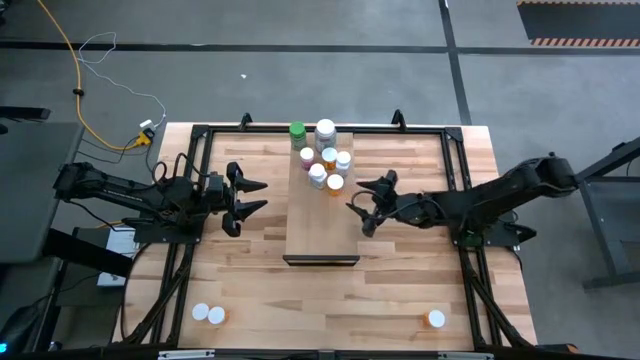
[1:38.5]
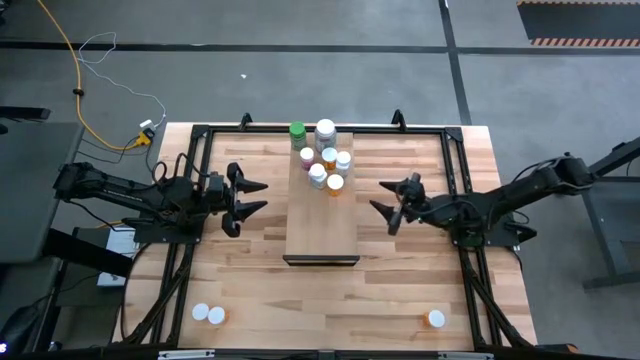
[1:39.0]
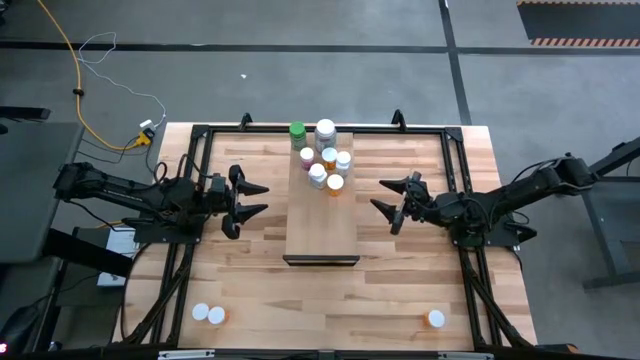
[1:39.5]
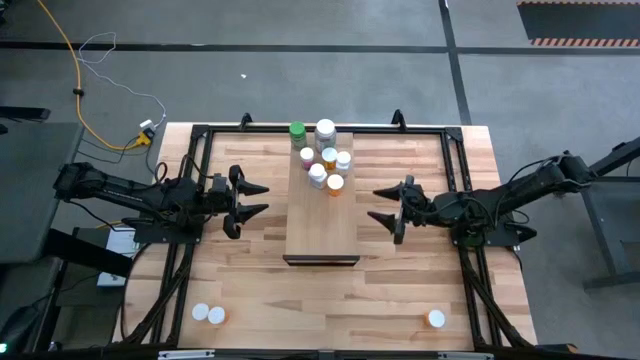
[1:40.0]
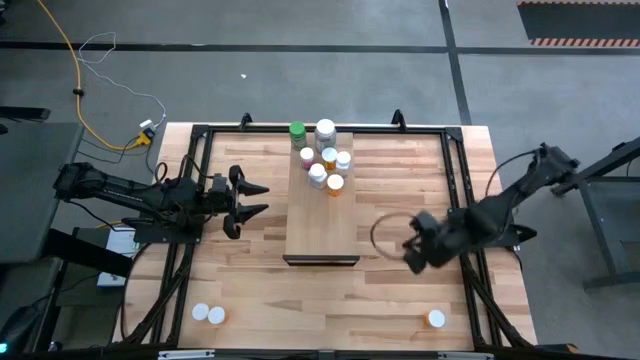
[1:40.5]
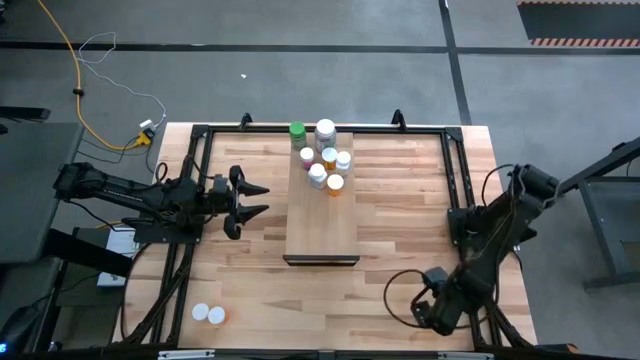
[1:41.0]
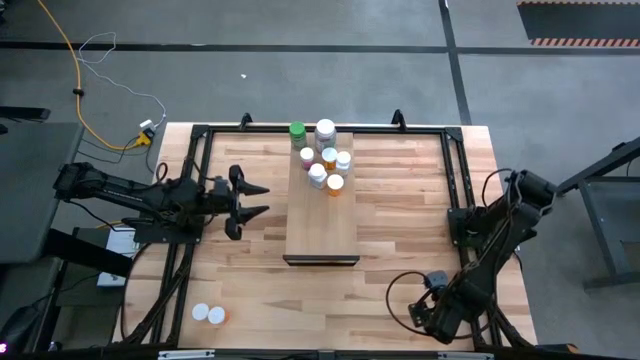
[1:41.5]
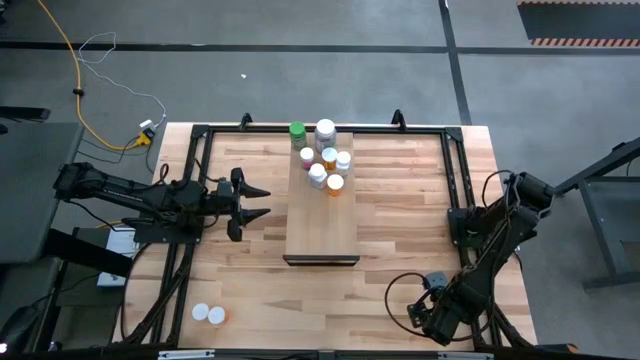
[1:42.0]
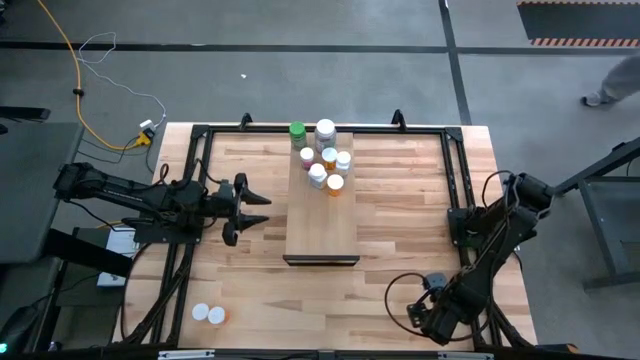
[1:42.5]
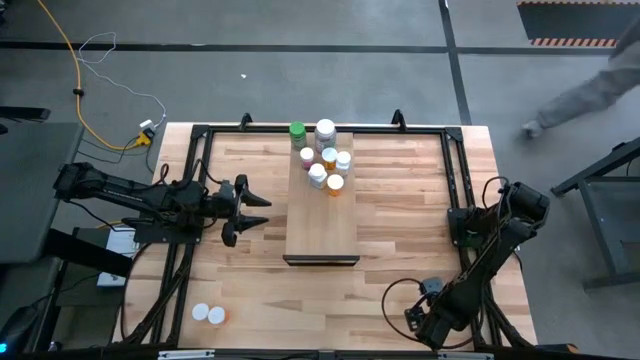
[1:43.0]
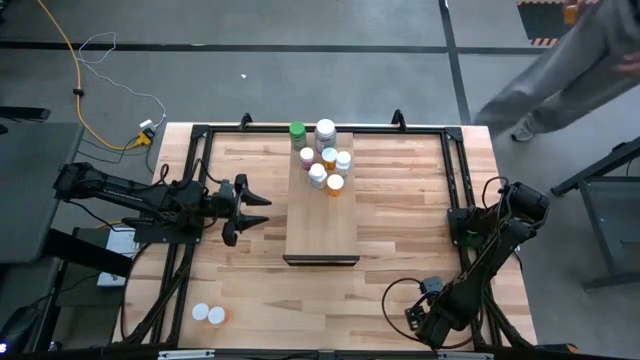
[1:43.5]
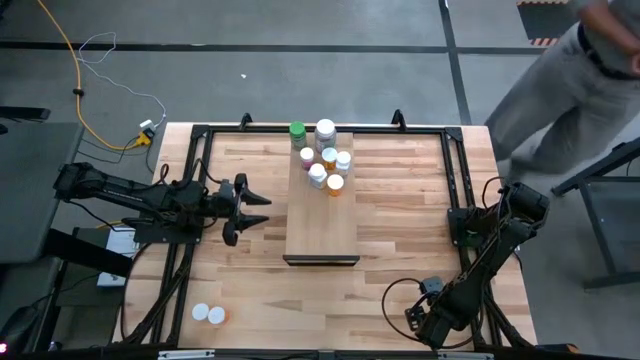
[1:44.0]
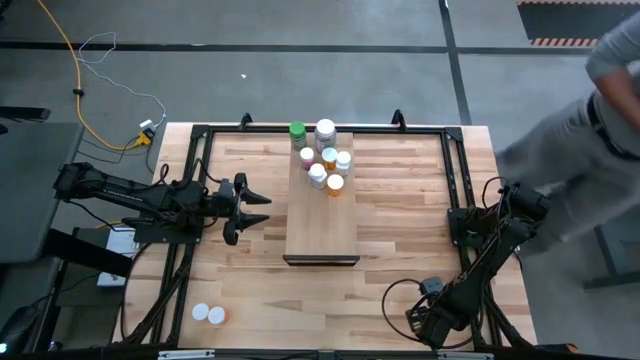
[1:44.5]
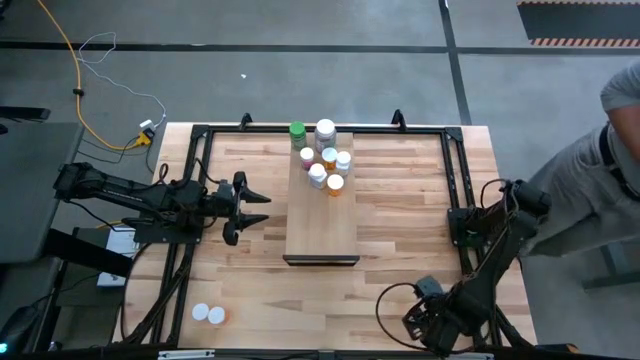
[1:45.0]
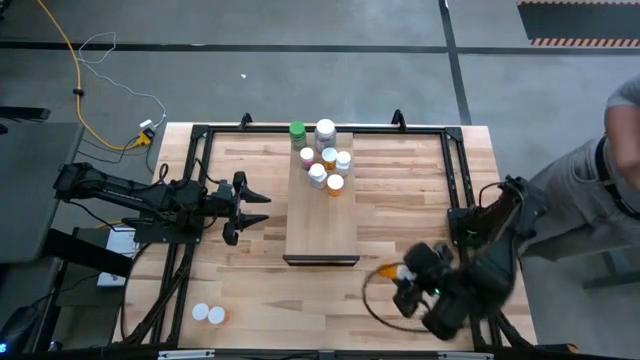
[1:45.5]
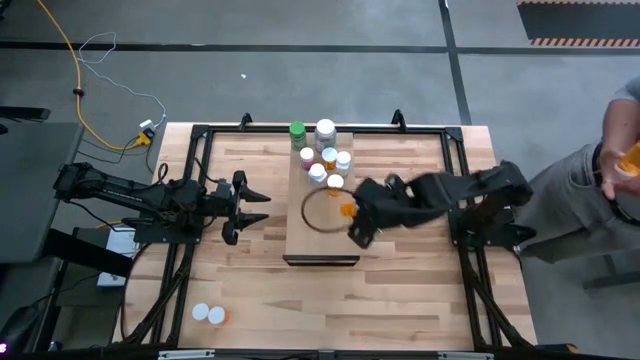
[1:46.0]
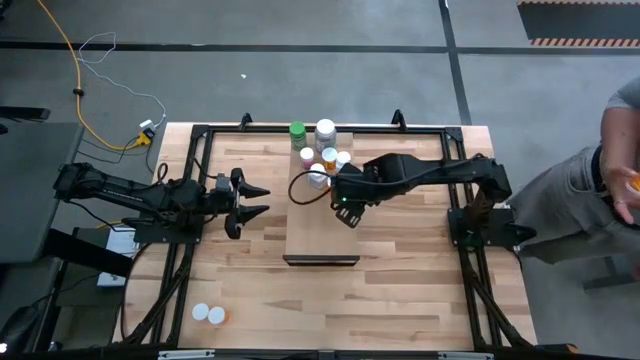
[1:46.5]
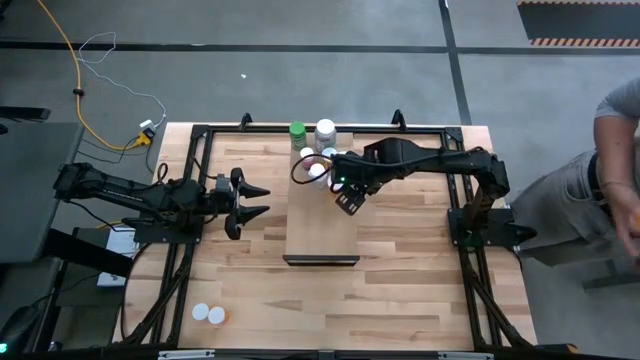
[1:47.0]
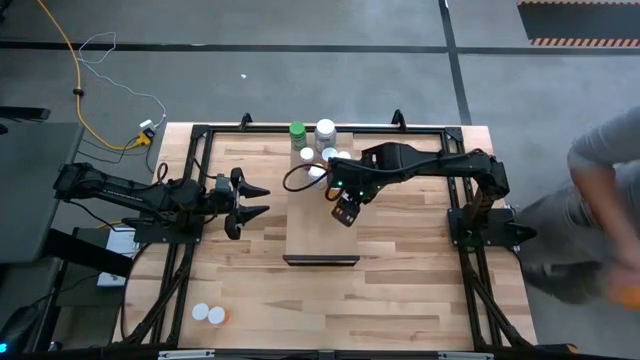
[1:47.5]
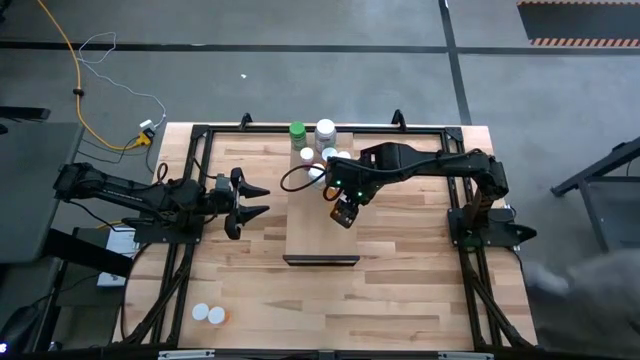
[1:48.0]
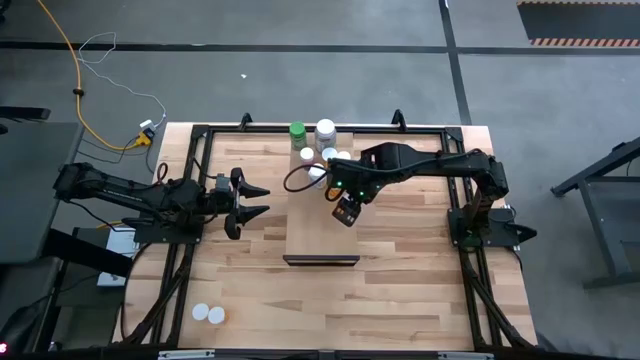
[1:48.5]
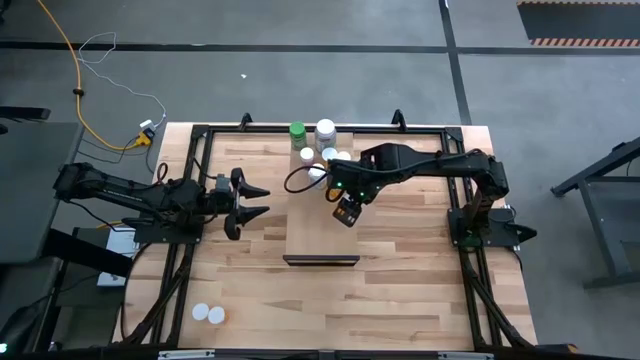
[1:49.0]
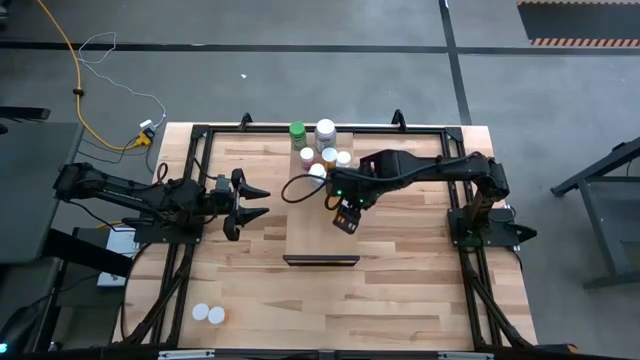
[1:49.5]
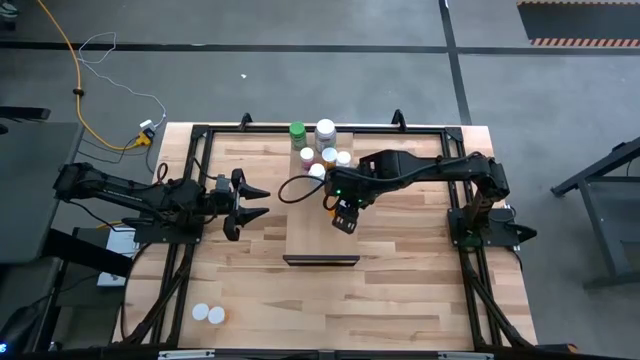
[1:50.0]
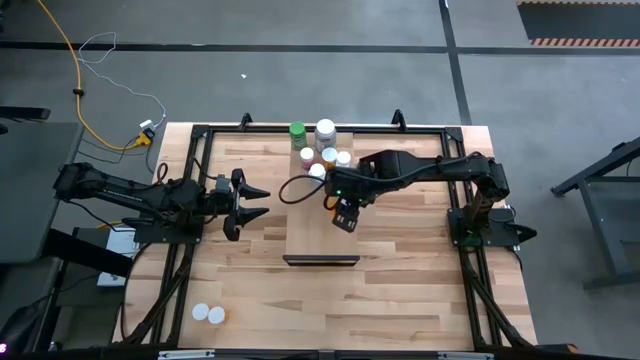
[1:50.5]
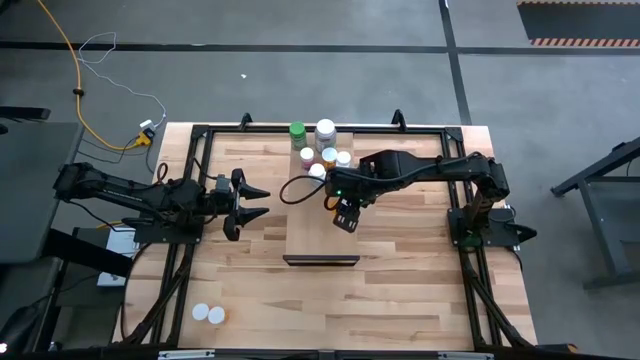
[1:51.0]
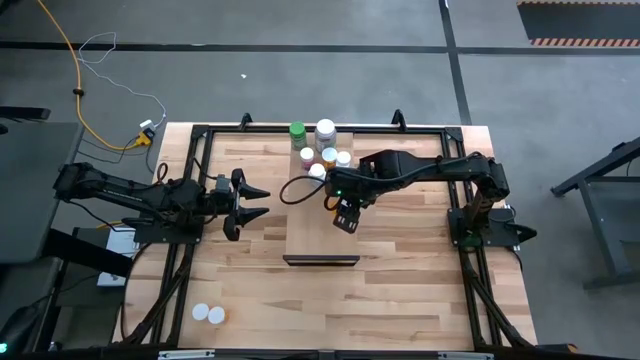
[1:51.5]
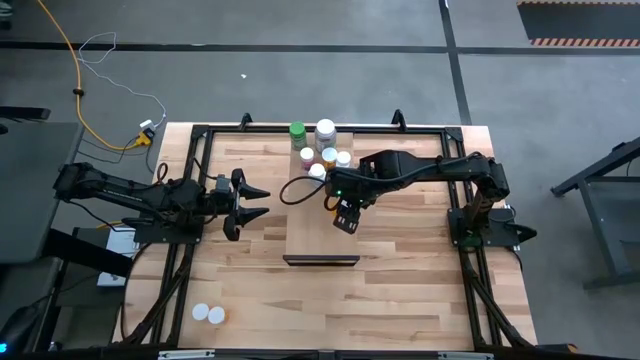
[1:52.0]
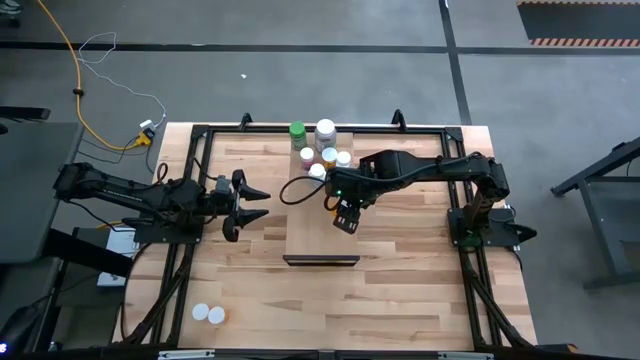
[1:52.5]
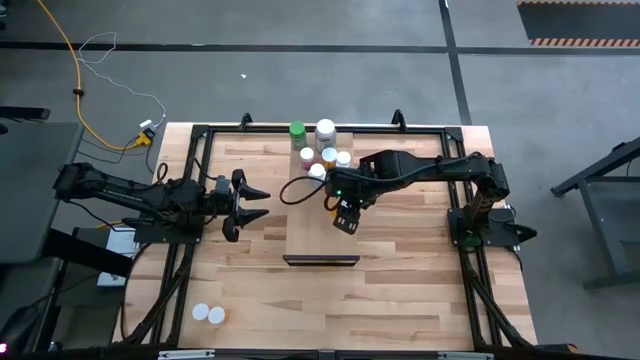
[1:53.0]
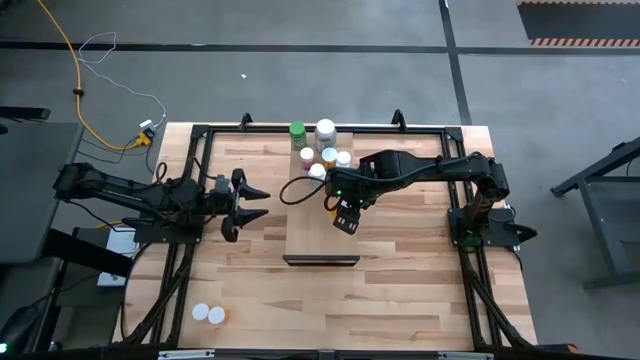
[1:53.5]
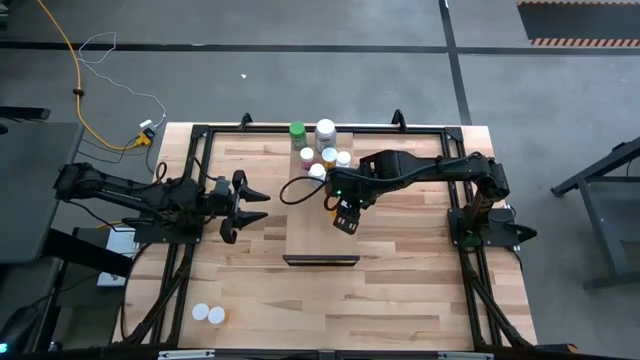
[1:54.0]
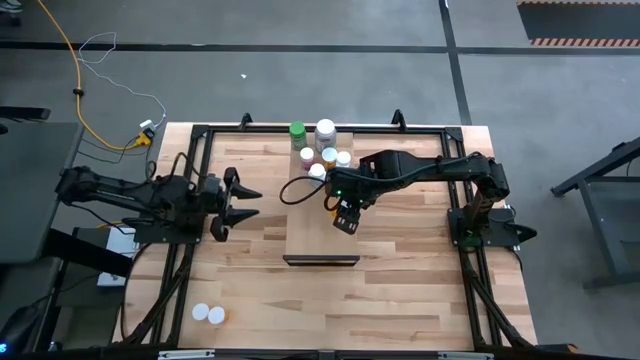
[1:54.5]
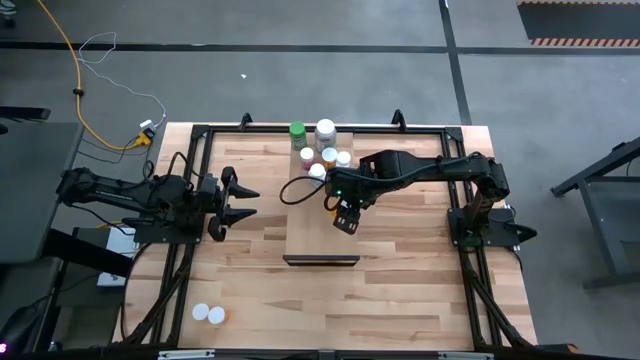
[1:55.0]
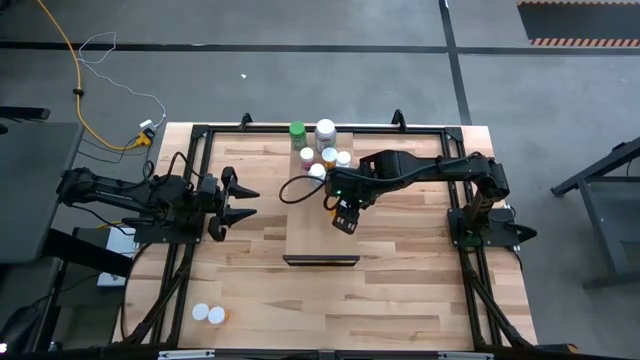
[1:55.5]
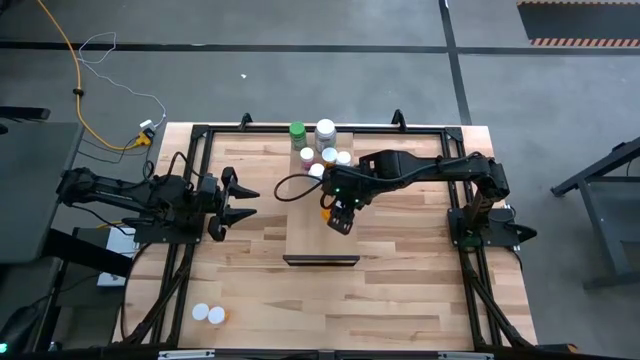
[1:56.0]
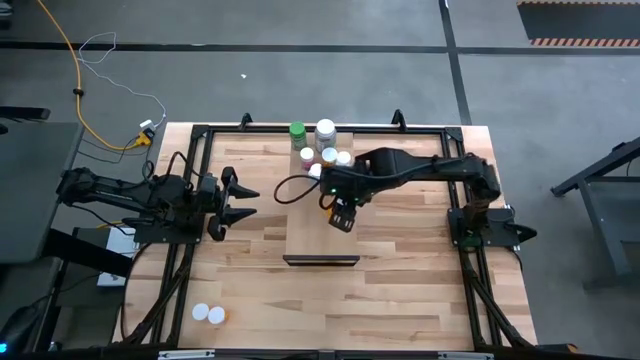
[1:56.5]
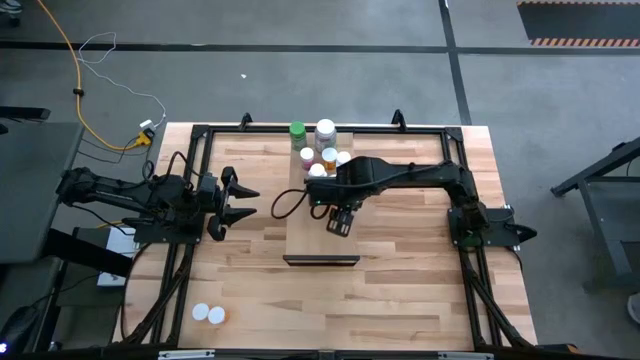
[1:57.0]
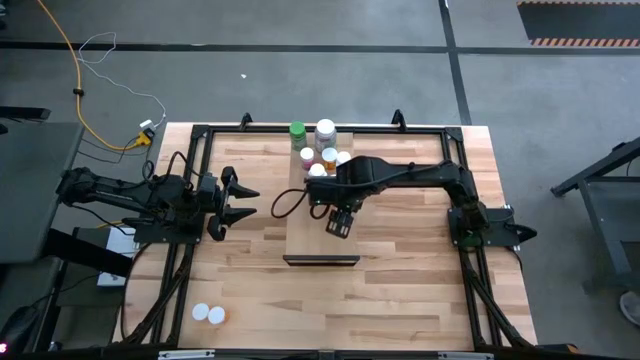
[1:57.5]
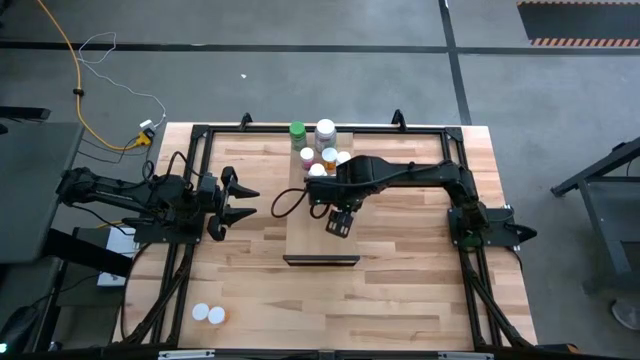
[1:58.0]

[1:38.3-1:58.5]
Task: Pick and place medicine bottles onto shelf by color
Put the orange pill bottle on the shelf
